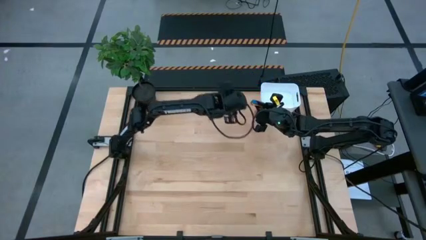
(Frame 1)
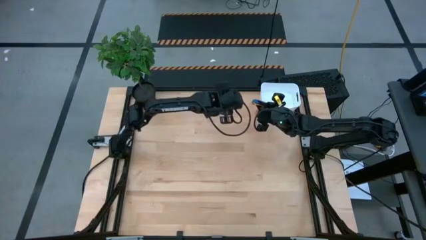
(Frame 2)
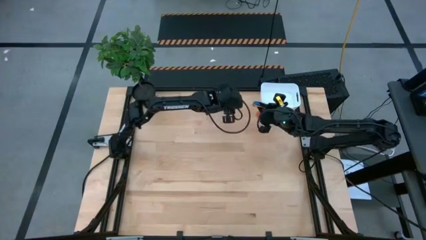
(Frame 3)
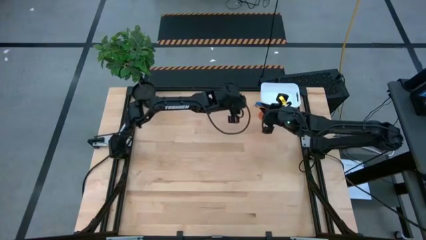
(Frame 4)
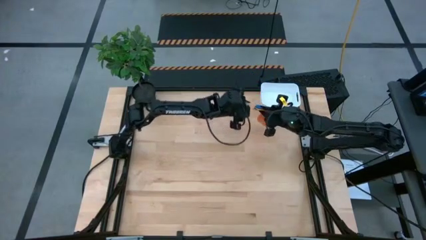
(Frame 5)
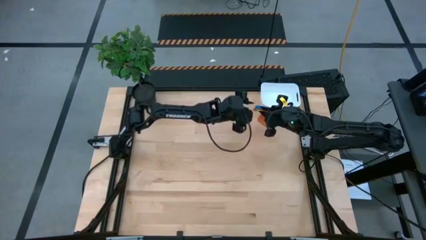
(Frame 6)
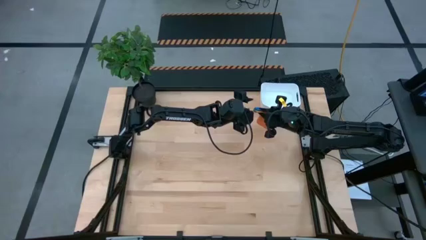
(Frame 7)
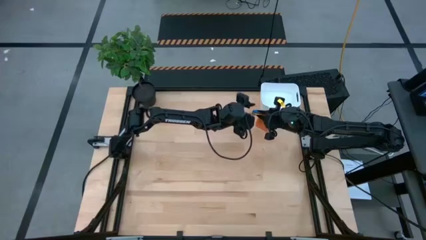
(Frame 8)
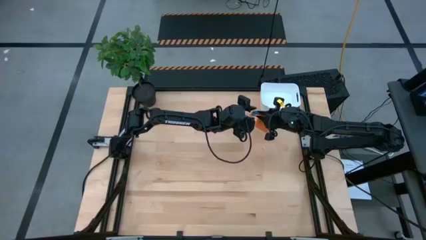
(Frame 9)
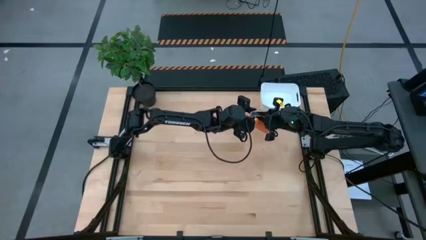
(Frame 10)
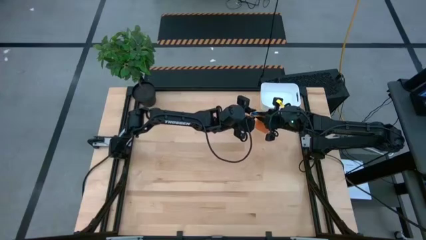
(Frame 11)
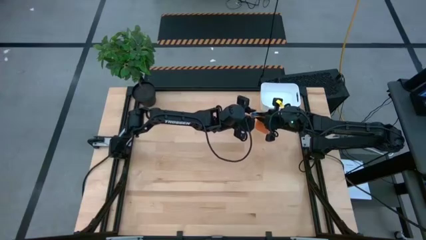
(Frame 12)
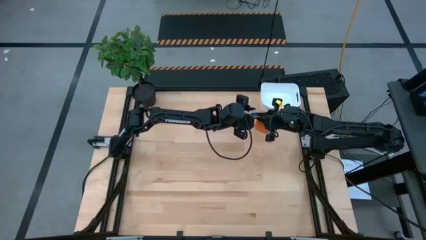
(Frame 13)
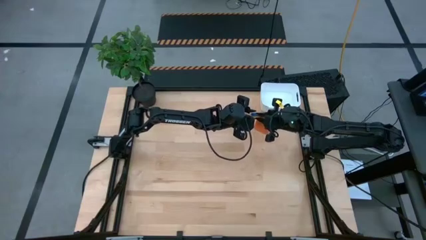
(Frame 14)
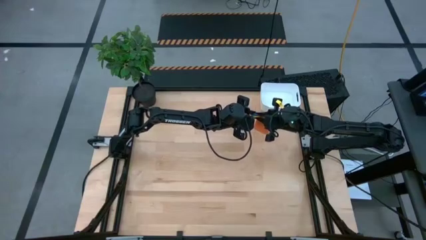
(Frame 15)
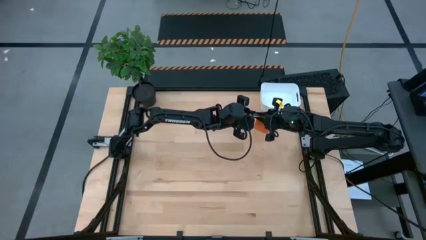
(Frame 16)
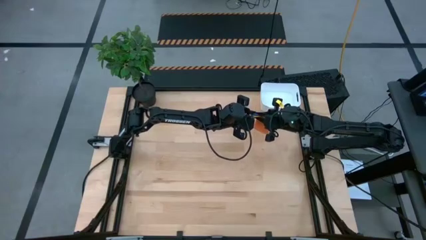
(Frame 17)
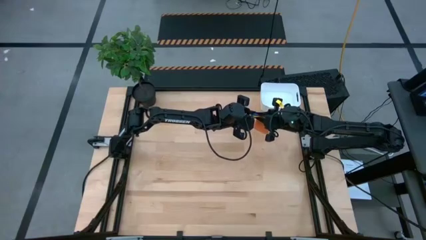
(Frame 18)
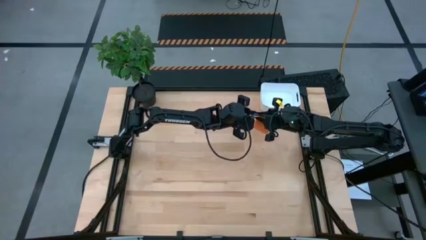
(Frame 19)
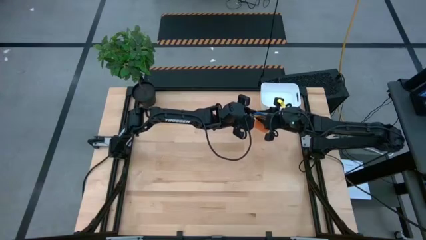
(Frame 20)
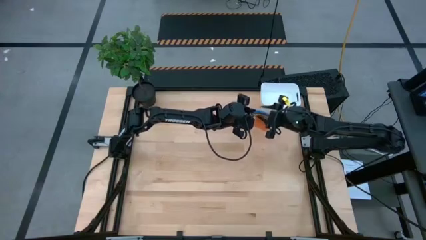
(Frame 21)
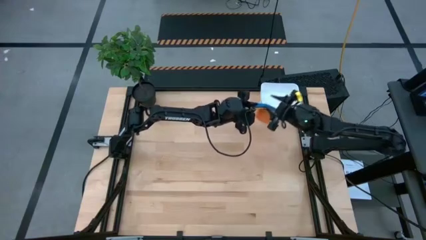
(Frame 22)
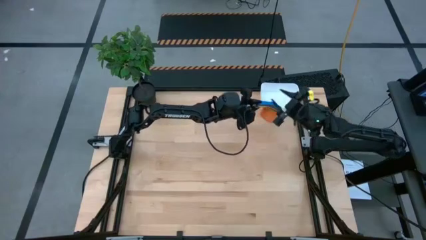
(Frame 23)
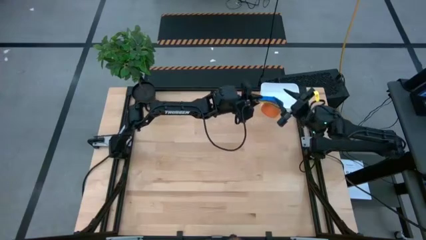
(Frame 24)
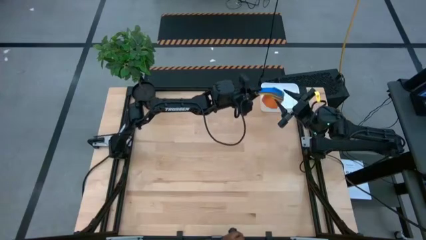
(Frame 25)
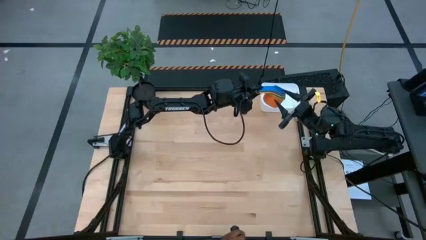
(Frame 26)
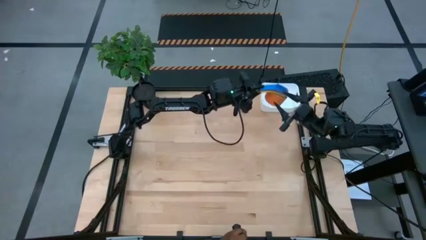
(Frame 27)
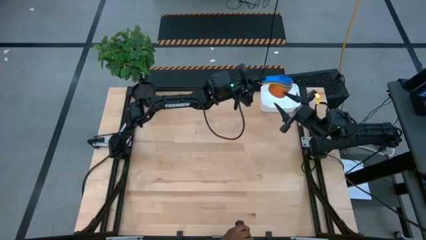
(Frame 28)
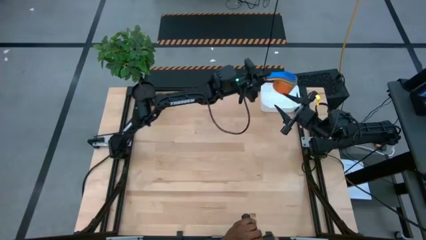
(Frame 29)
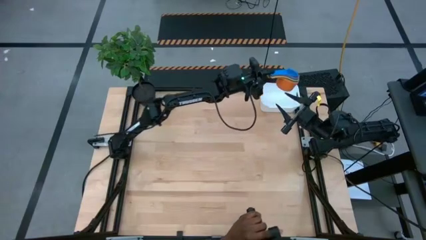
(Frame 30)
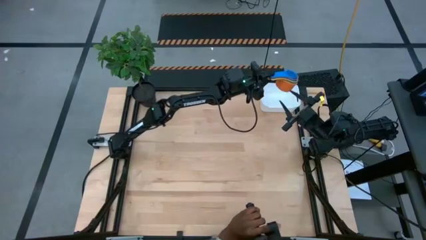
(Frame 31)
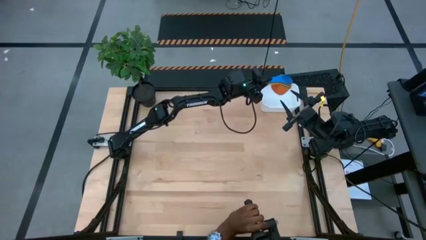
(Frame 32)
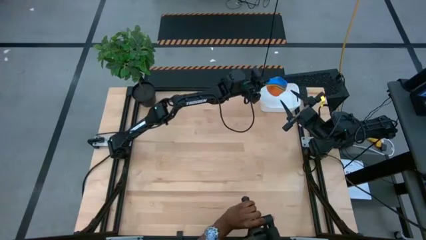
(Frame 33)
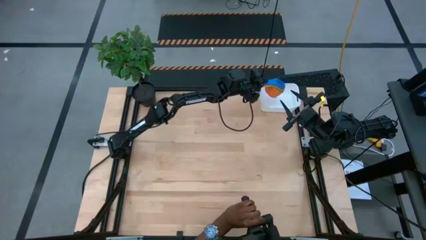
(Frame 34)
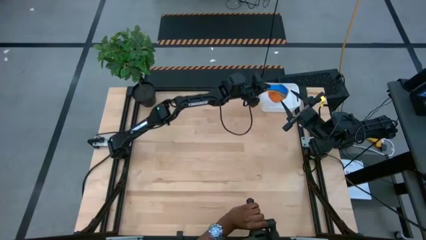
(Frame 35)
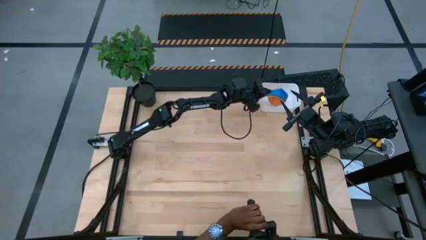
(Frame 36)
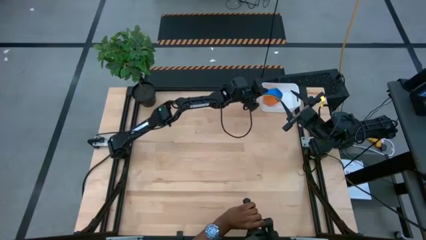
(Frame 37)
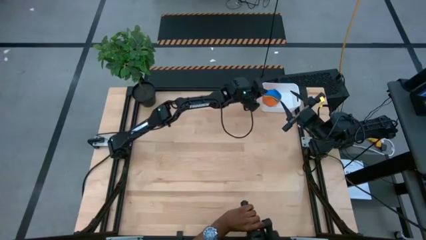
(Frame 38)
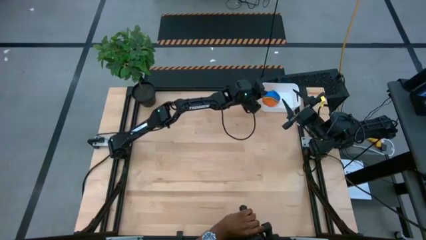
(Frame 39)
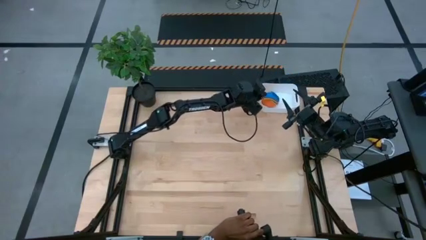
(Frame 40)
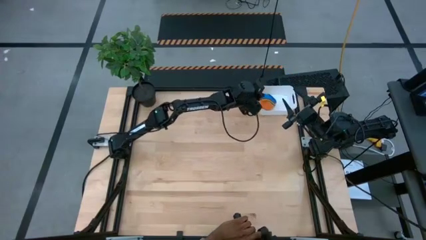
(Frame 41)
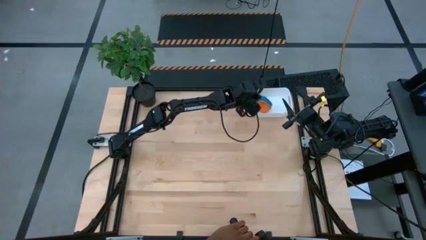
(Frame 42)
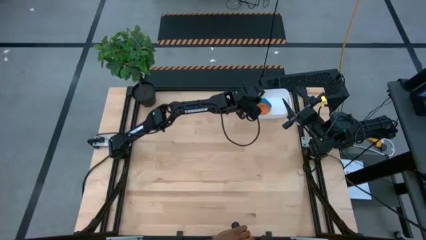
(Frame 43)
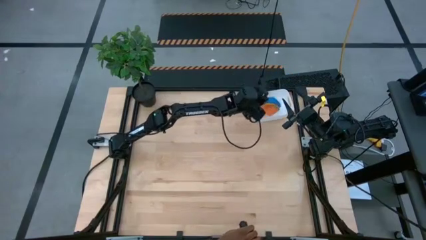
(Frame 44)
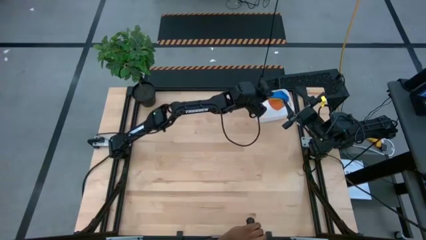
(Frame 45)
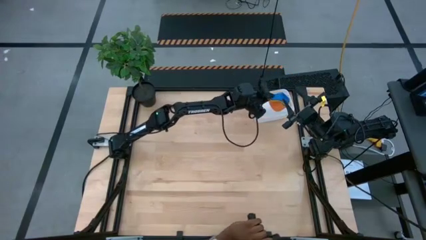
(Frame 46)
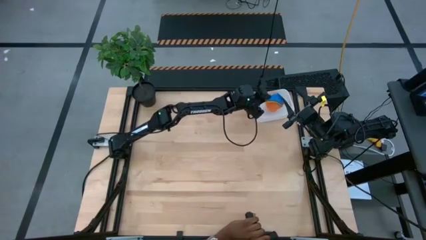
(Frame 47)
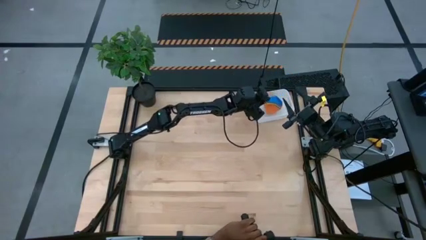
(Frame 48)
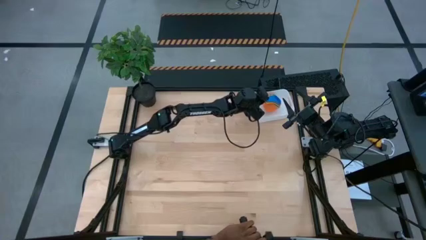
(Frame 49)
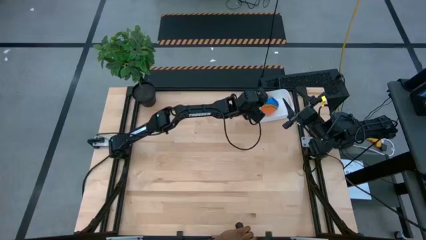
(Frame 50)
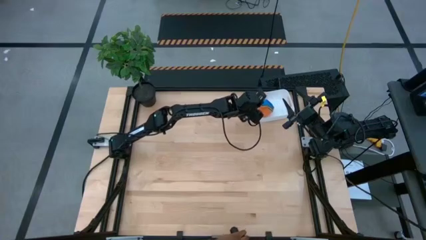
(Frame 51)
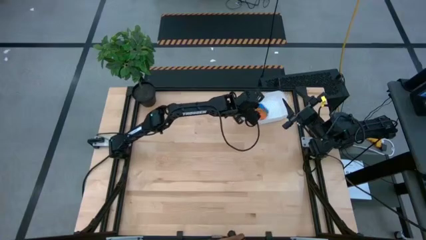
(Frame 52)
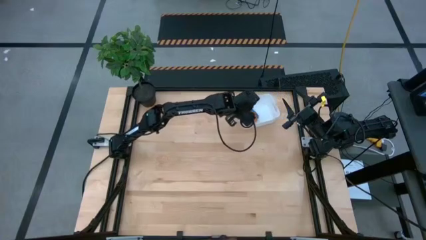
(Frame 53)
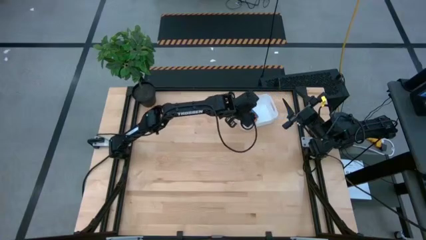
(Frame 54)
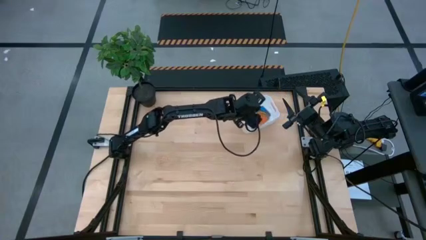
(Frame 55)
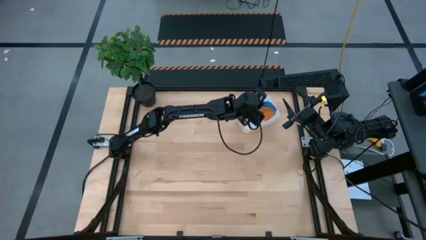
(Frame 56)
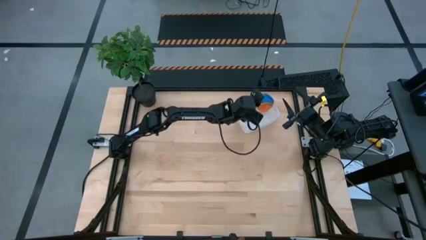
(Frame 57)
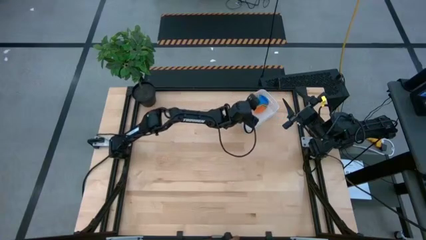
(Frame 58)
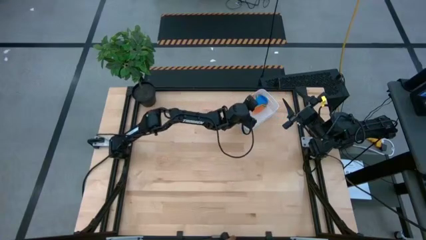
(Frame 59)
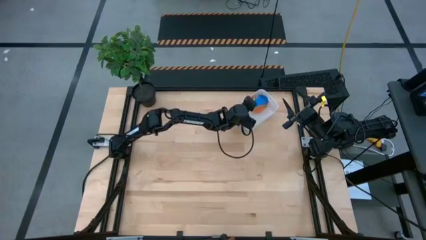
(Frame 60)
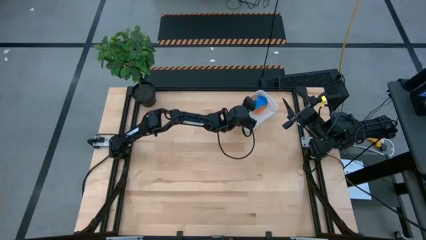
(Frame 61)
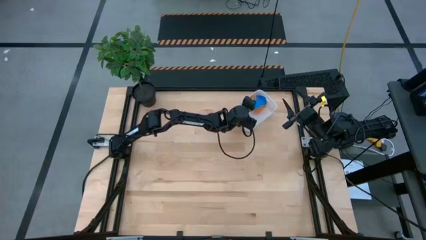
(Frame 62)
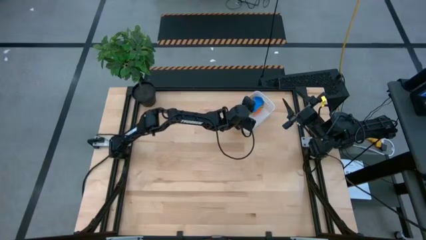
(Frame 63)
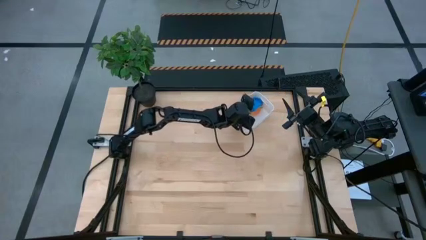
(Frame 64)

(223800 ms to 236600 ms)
Task: Nest measuring cups in basket
Put the stacked measuring cups into the white bin
